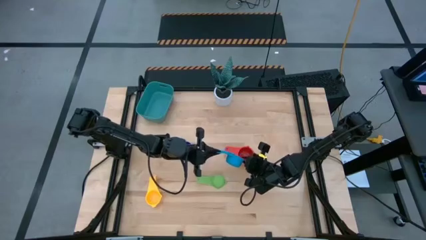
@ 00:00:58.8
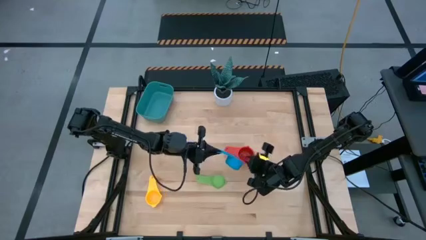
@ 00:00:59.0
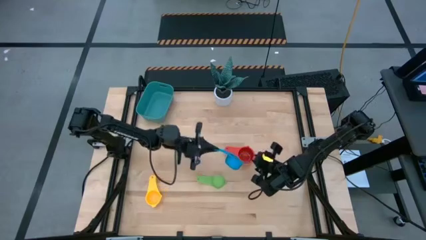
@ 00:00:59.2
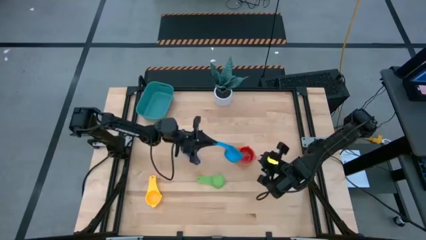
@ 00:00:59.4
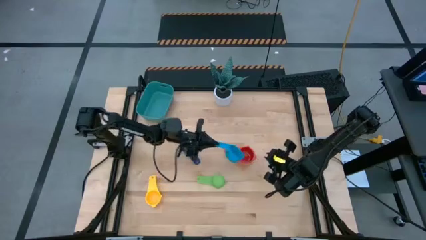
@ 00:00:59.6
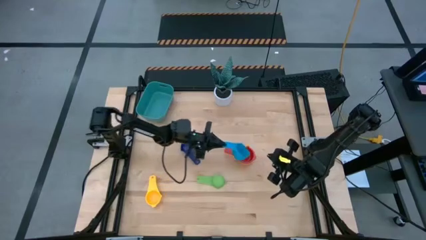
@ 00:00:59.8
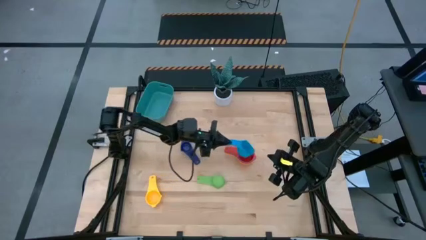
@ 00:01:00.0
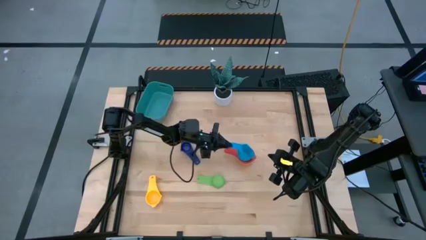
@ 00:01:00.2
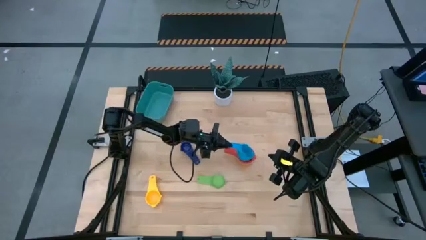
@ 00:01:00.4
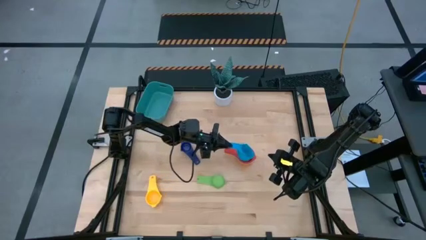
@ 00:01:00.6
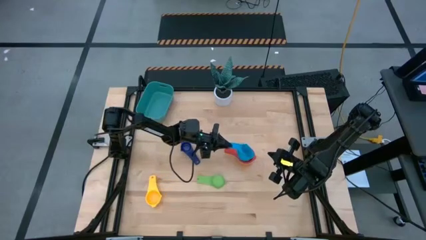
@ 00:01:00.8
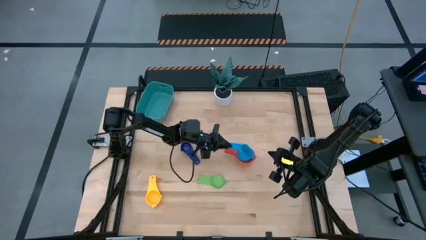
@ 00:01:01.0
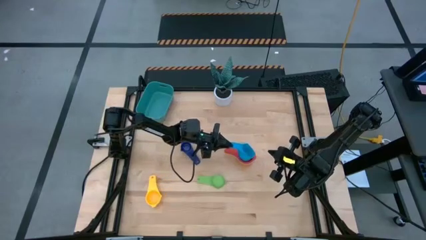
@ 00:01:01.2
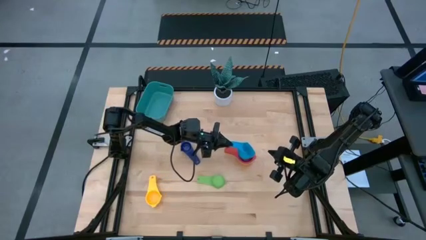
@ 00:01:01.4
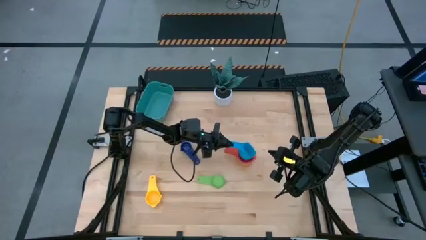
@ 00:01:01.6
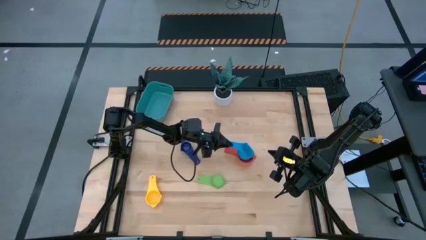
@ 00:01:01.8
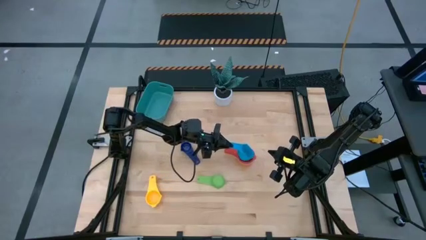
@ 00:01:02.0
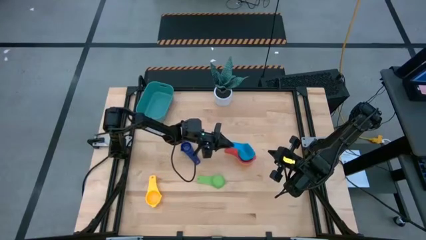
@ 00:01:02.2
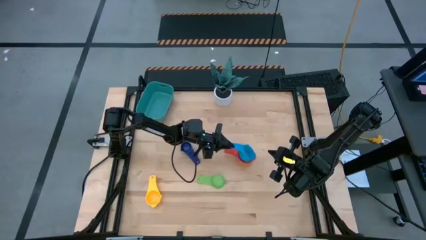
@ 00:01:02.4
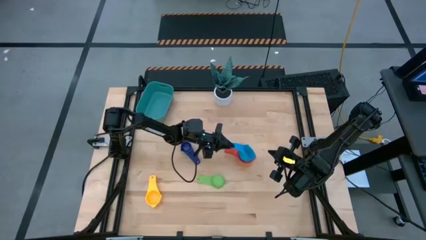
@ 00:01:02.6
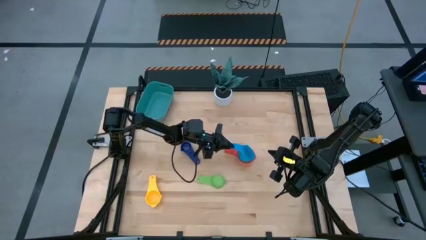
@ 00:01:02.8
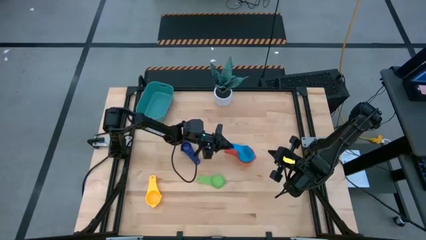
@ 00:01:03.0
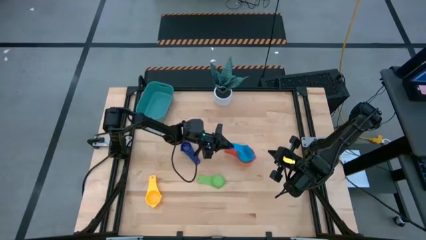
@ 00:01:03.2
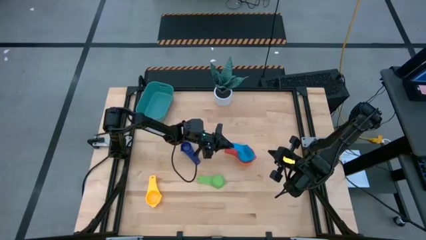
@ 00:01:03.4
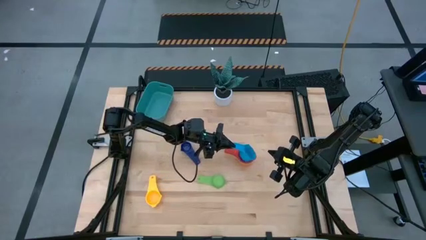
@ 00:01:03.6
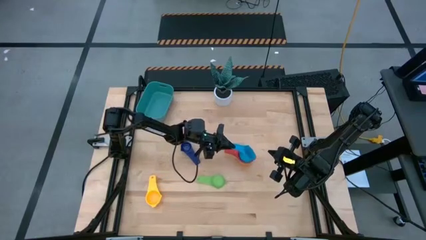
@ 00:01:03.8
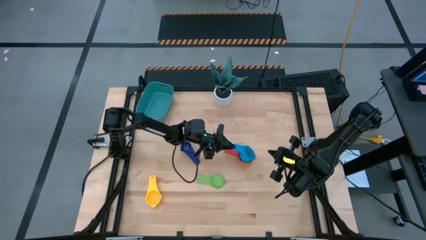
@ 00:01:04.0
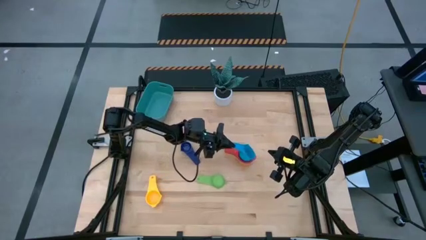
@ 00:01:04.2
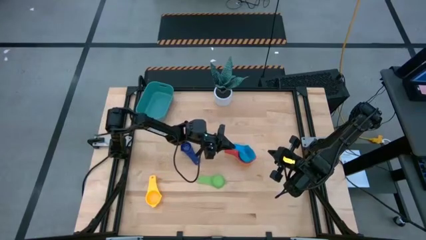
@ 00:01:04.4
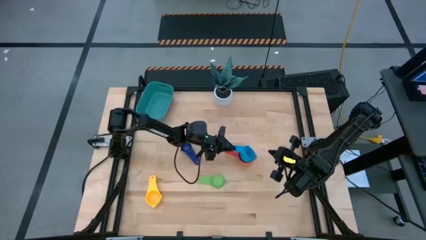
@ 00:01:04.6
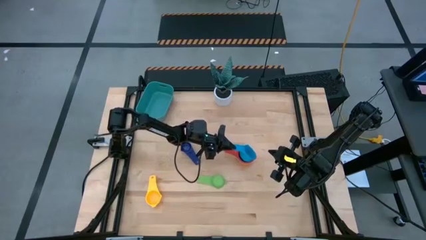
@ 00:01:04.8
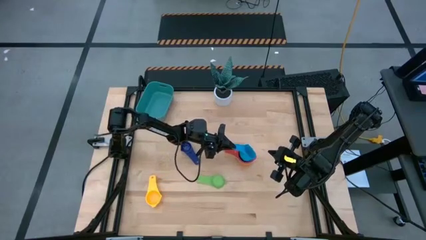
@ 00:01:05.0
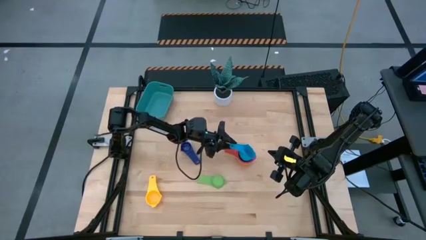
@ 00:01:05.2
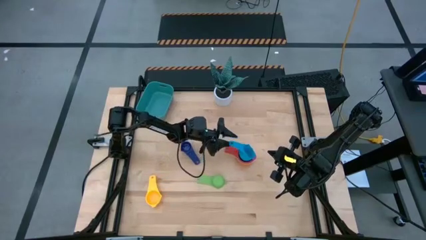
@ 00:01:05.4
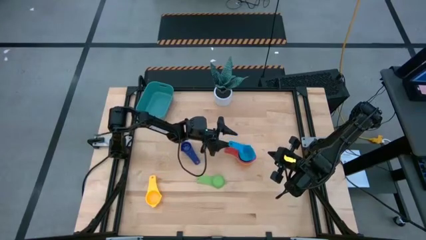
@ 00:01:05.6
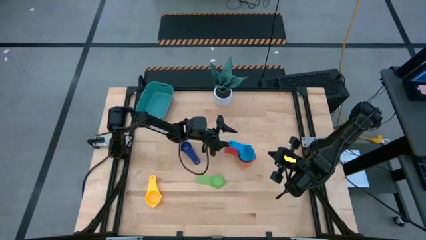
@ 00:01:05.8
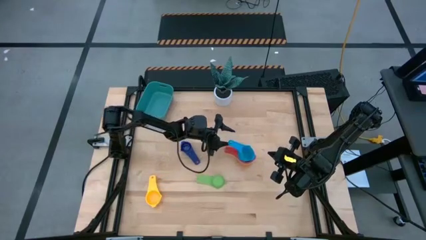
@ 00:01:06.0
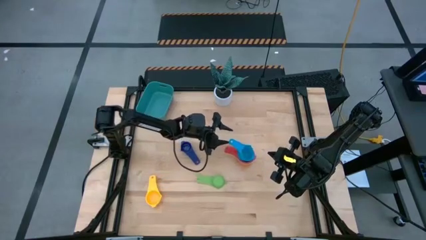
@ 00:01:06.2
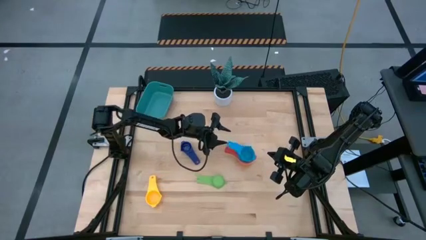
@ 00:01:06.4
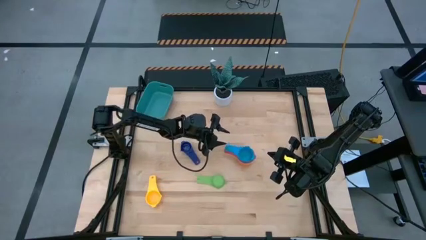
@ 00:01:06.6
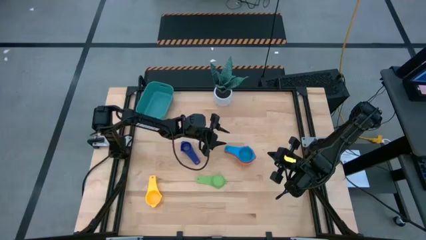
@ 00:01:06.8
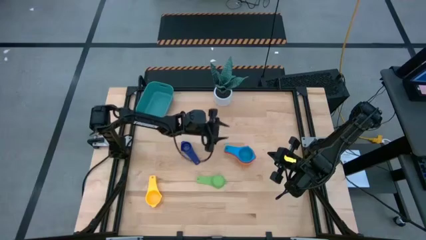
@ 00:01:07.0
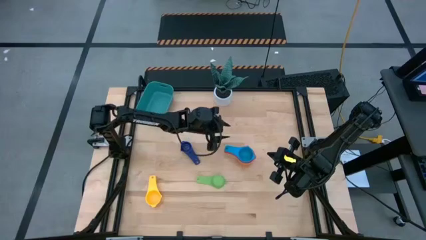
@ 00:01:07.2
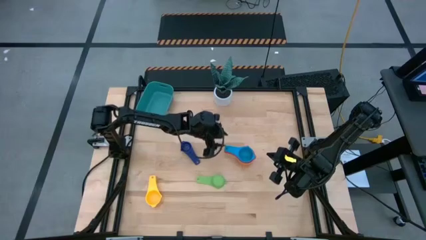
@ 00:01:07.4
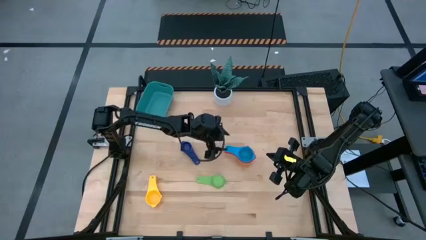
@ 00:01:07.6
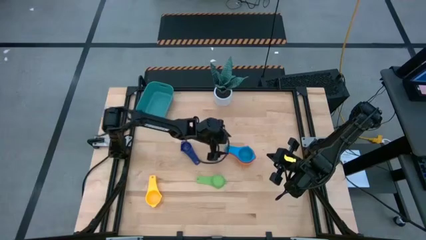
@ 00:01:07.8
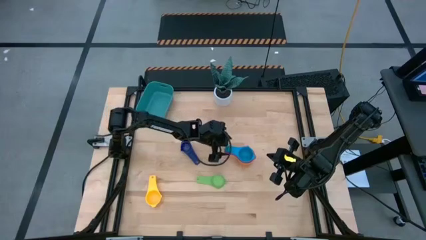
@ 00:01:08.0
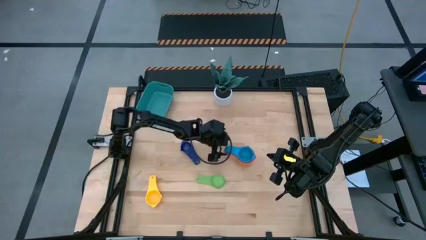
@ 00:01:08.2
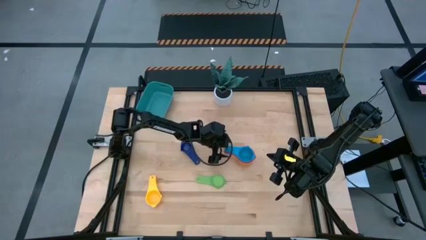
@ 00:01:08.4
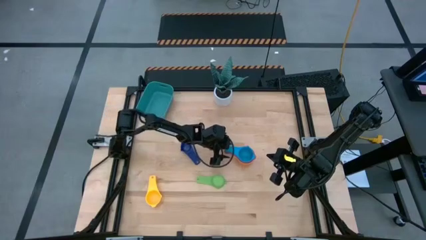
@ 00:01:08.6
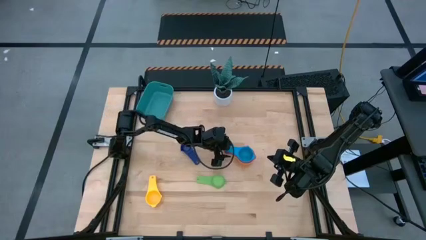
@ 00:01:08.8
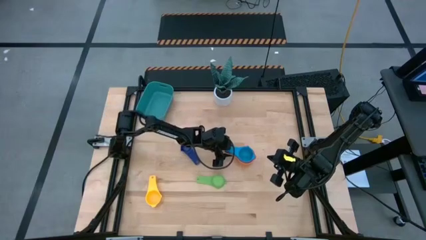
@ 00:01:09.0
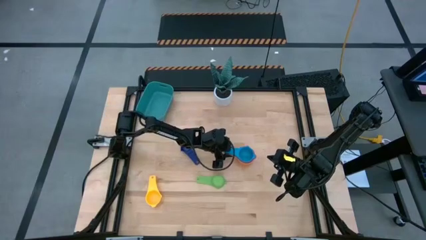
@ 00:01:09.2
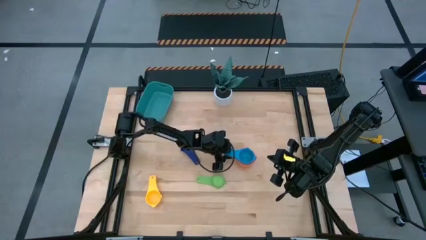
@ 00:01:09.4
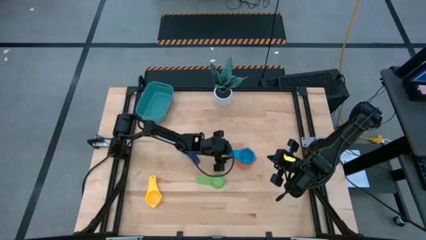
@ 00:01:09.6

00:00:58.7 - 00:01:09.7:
Task: Nest measuring cups in basket
Stack the light blue measuring cup on top of the orange measuring cup

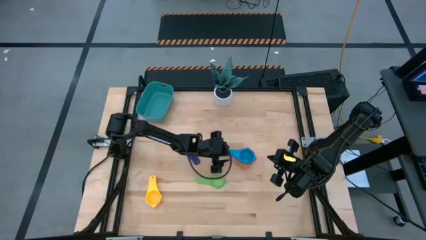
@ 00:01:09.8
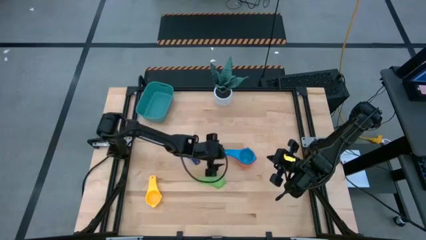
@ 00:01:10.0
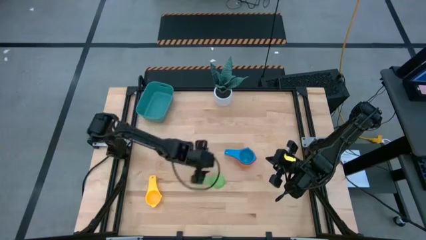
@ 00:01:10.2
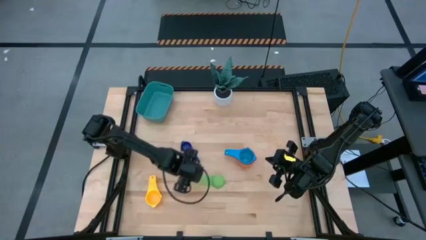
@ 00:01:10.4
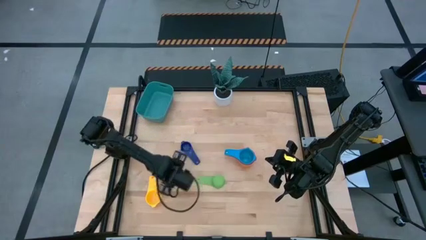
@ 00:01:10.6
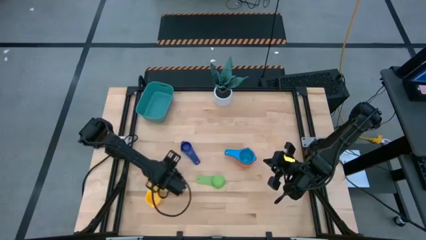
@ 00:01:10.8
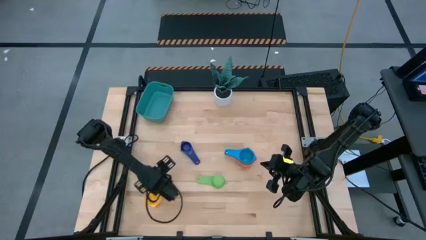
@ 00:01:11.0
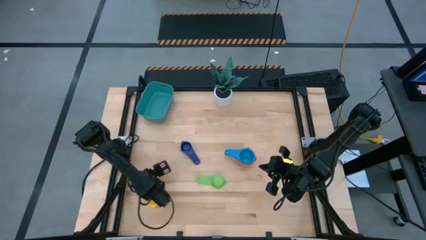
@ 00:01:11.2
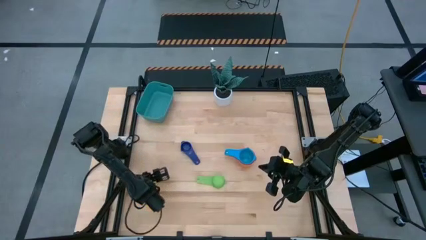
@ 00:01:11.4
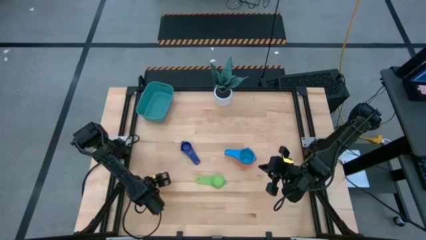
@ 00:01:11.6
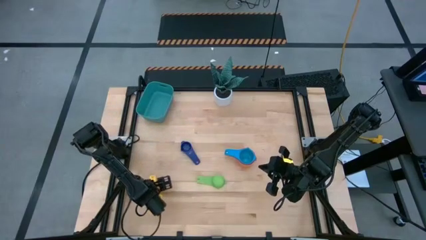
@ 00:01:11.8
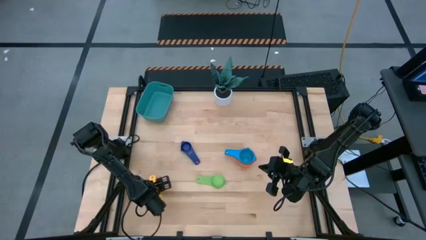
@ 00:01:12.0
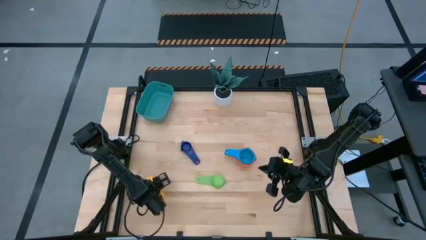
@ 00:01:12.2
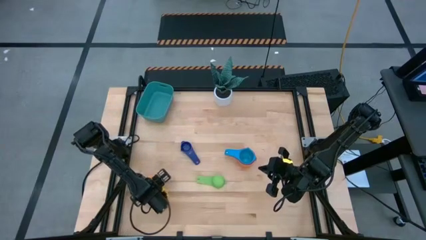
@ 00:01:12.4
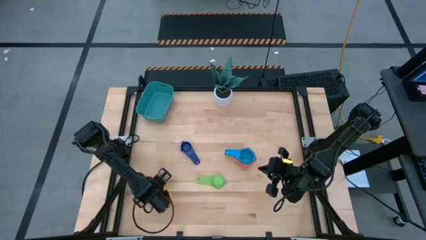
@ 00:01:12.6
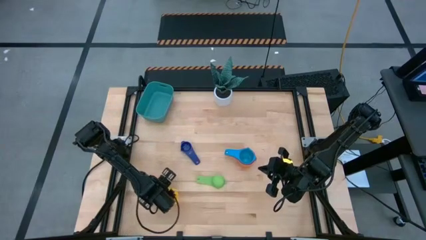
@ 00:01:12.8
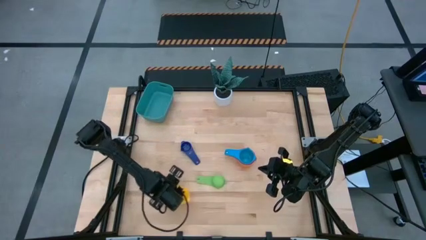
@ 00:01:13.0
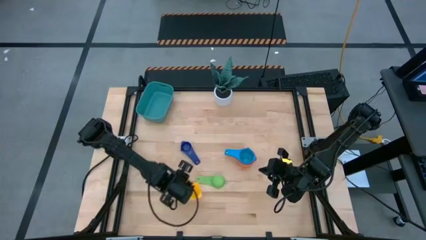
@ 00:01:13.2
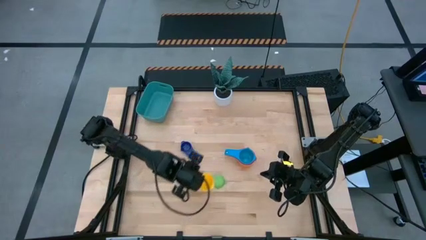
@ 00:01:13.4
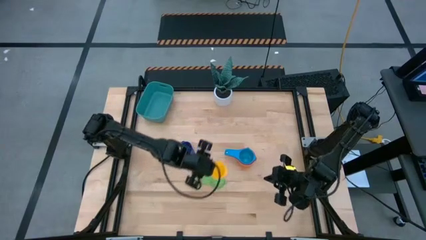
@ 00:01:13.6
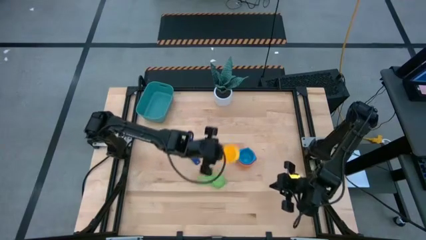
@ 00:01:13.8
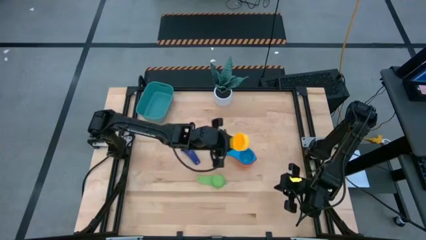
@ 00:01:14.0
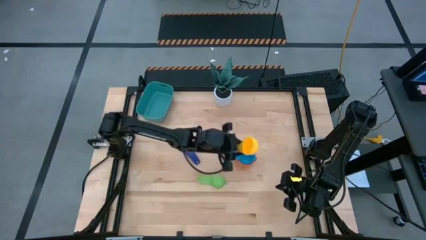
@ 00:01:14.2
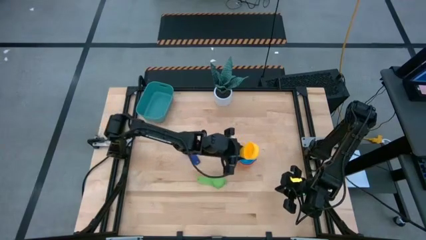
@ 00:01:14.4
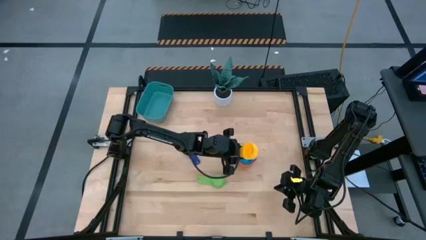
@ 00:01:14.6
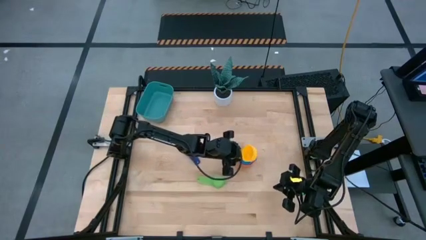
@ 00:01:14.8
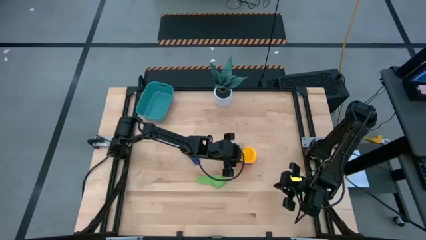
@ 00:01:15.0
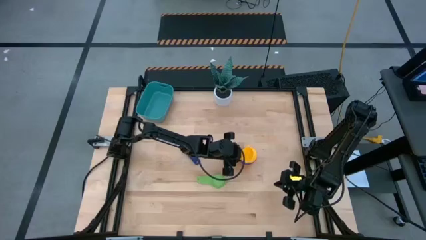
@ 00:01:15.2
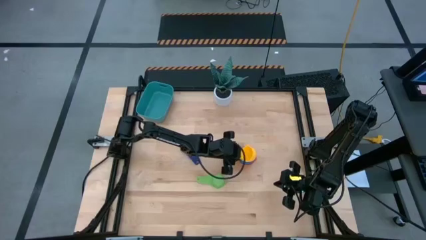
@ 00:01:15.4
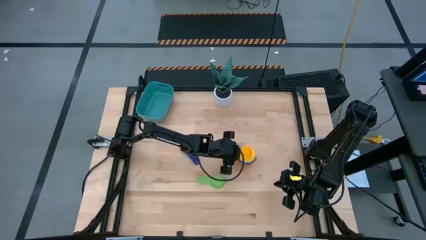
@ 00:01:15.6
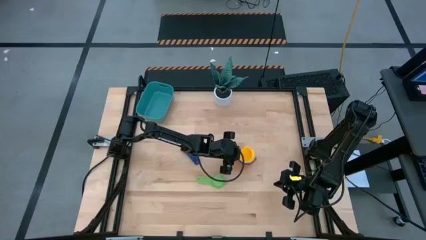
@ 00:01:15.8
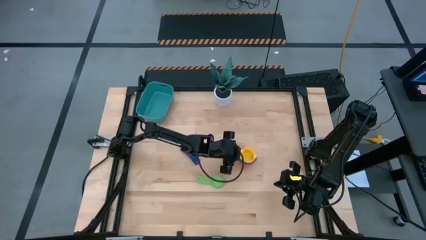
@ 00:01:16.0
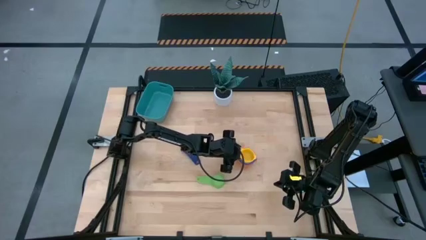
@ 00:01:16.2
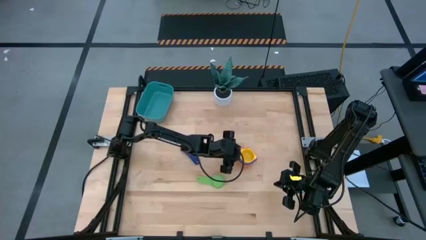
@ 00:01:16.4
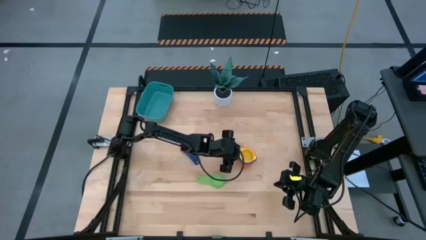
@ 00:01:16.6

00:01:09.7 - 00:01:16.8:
Stack the yellow measuring cup on top of the light blue measuring cup
